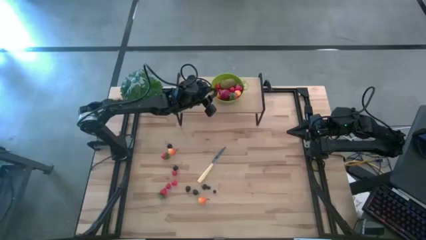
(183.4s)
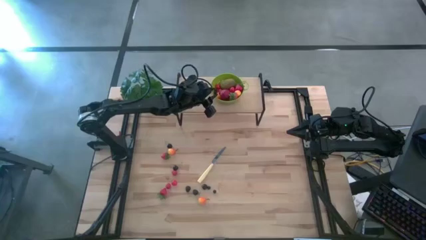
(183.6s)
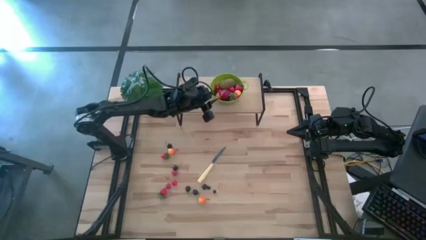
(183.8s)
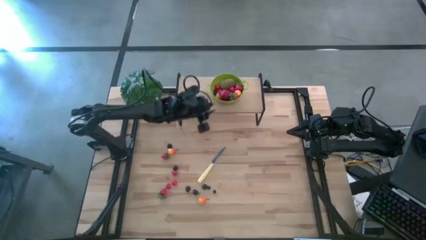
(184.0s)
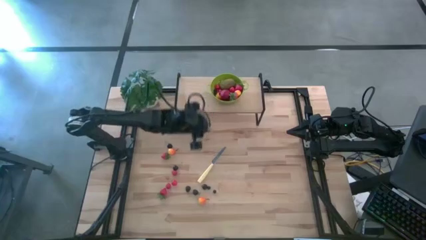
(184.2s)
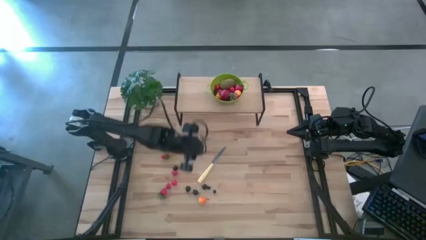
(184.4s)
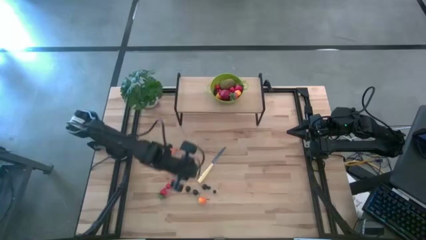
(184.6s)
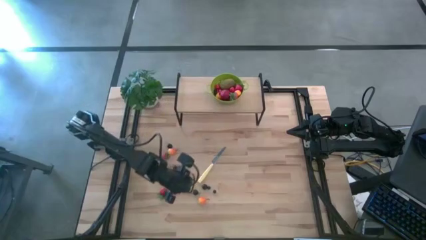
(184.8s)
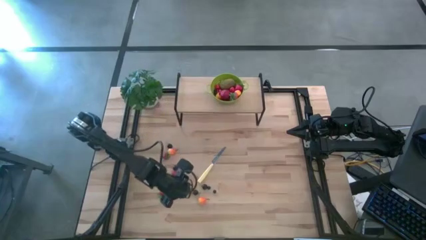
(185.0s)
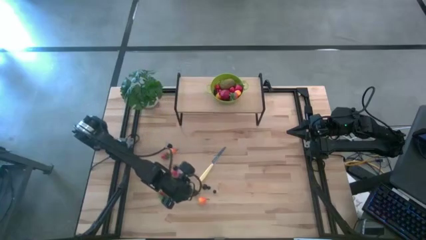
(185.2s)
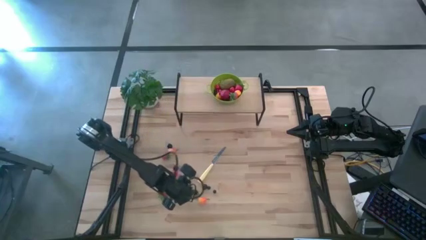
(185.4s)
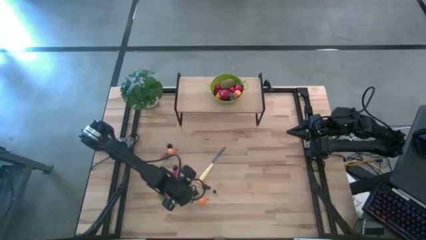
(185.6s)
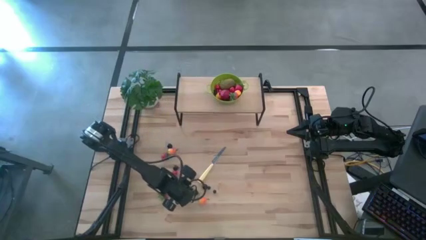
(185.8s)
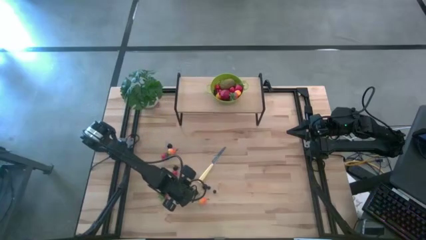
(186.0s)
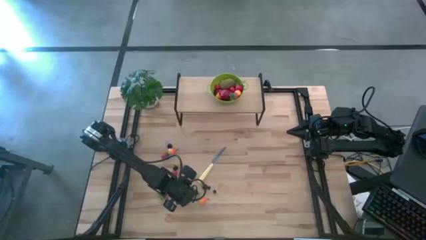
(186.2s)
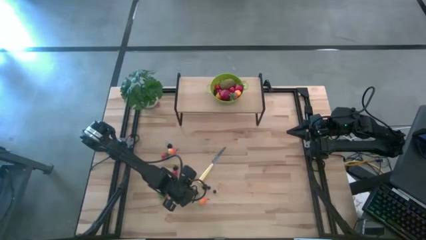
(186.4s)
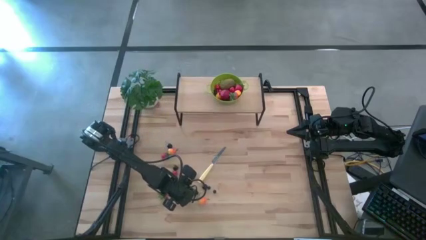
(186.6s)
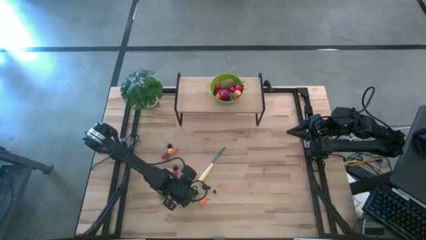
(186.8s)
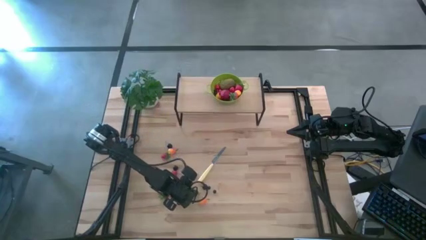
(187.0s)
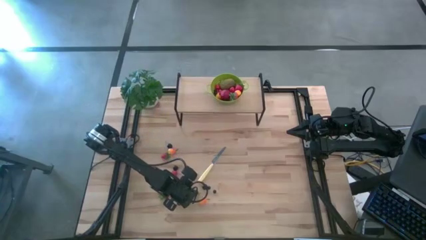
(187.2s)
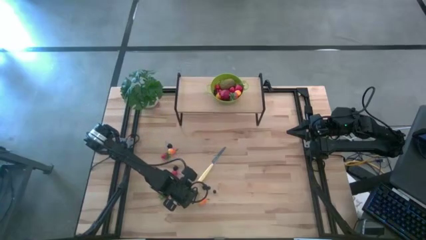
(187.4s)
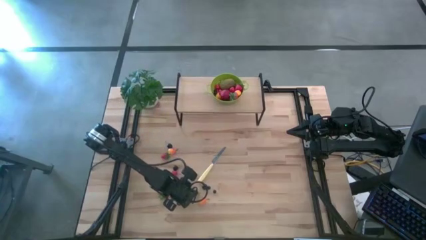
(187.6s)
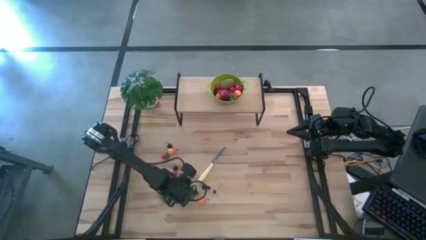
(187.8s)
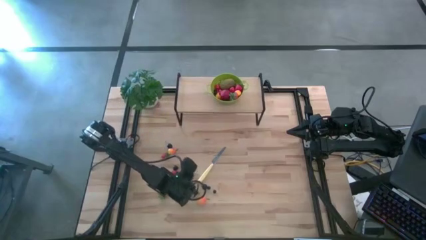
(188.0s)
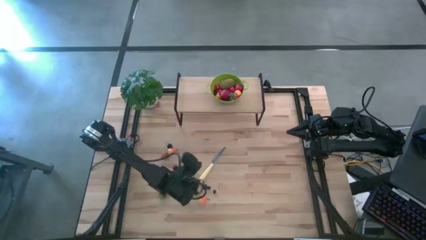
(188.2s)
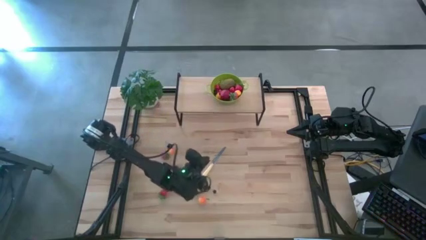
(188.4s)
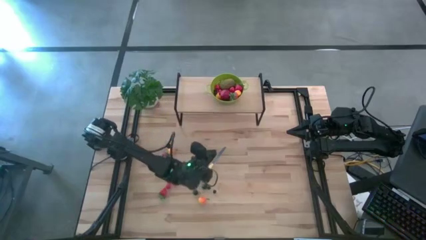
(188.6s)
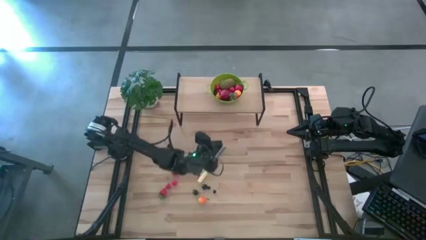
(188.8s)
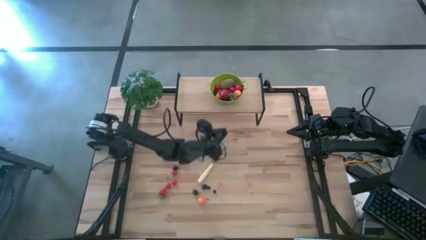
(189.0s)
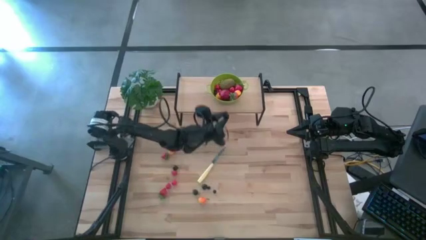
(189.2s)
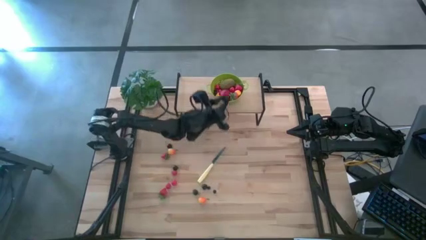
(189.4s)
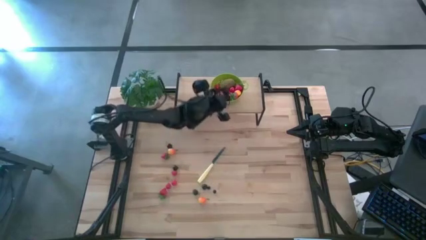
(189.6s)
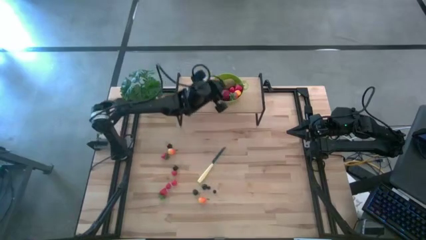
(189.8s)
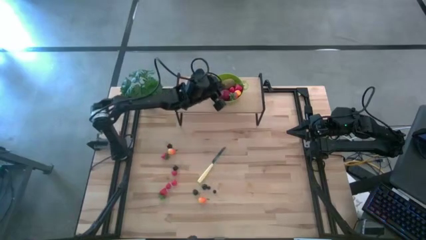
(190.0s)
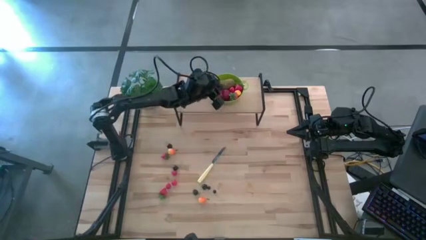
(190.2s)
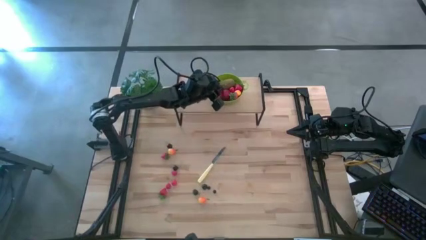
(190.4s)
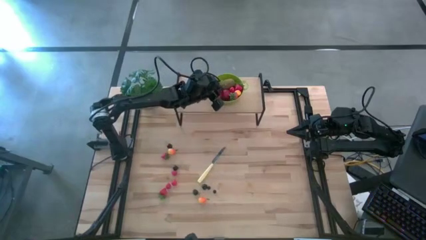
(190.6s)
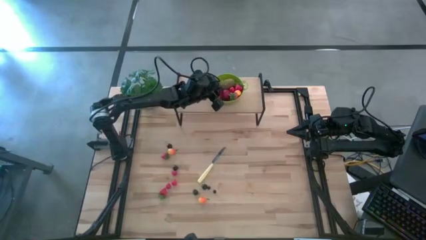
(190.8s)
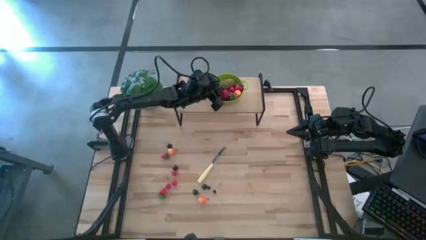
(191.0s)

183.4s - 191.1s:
Task: Pick & Place Fruit
Put the blackberry into the strainer bowl

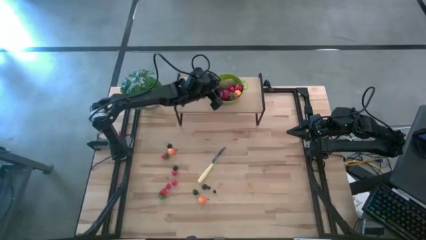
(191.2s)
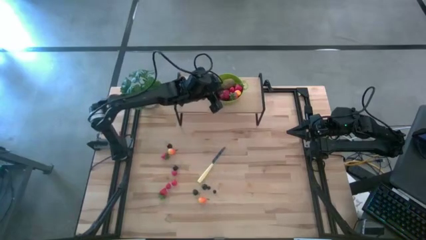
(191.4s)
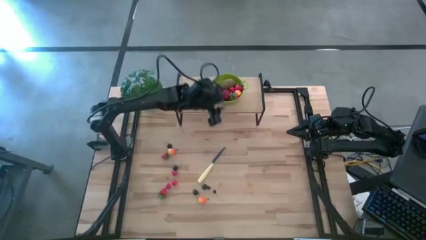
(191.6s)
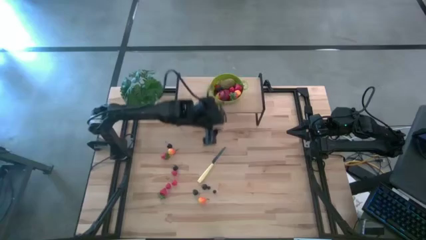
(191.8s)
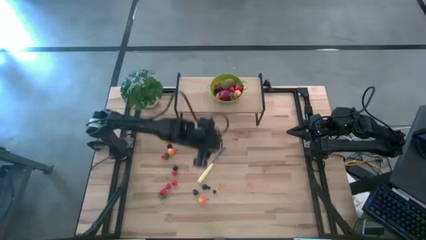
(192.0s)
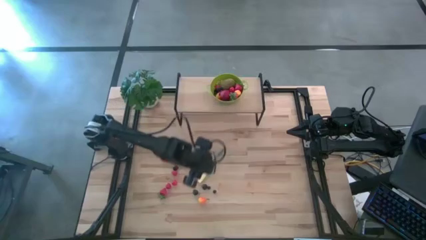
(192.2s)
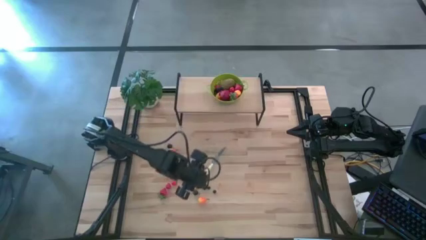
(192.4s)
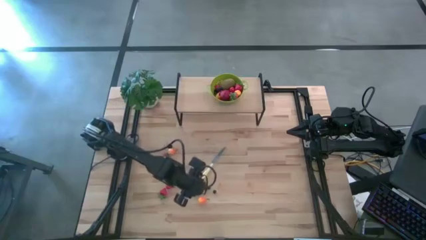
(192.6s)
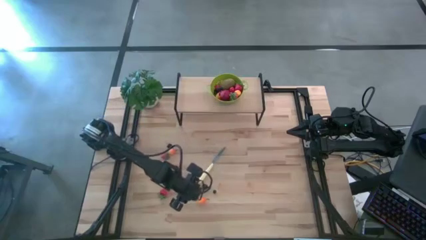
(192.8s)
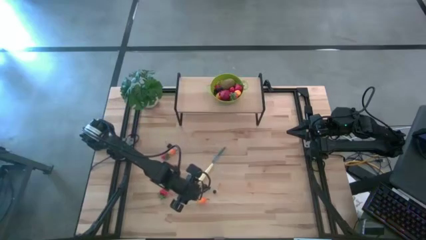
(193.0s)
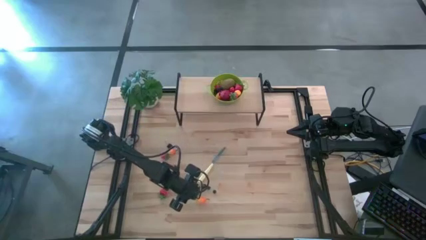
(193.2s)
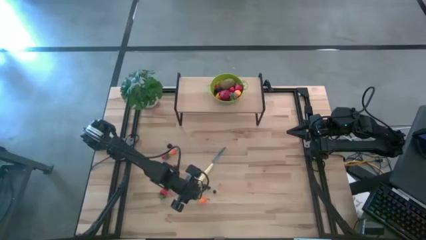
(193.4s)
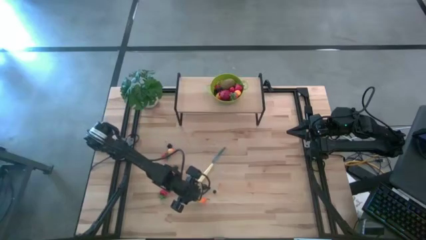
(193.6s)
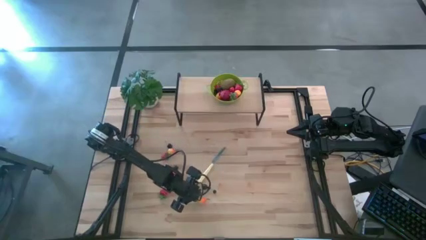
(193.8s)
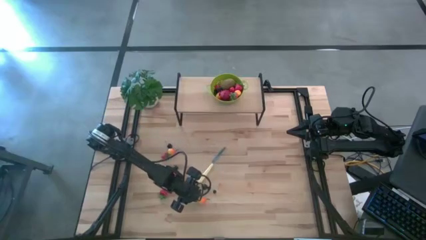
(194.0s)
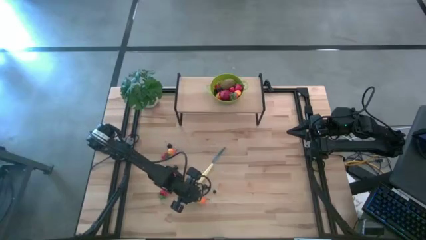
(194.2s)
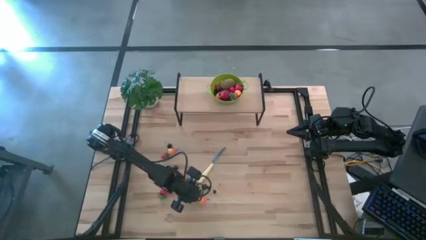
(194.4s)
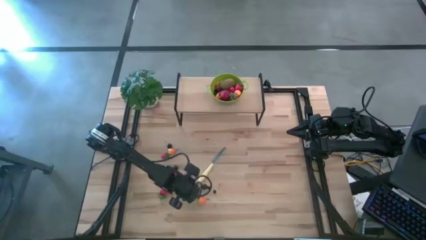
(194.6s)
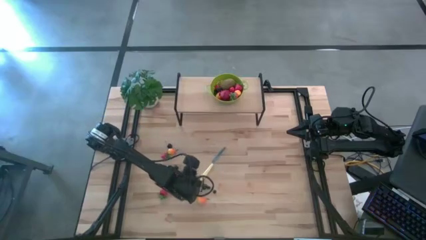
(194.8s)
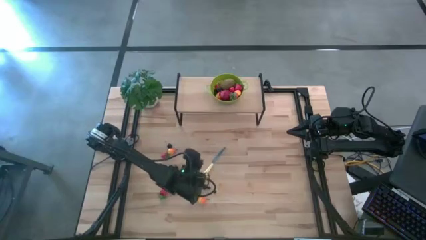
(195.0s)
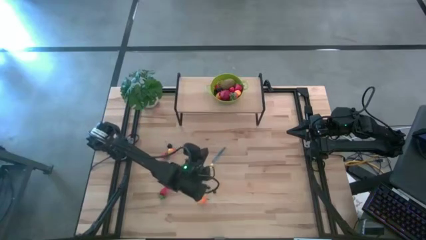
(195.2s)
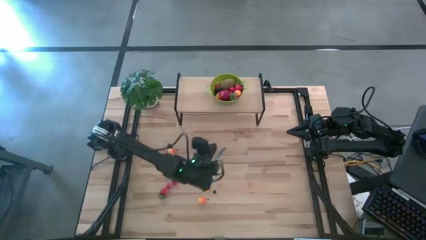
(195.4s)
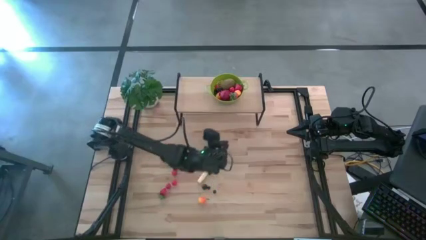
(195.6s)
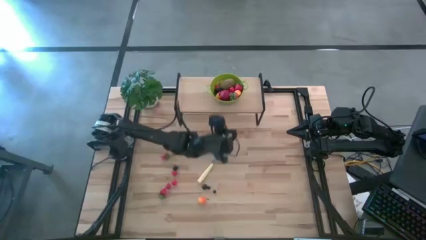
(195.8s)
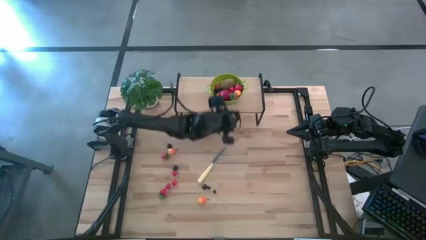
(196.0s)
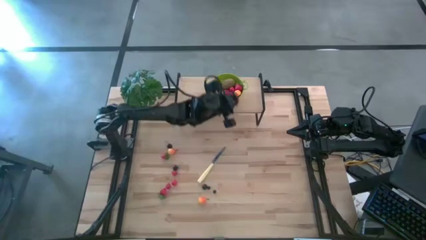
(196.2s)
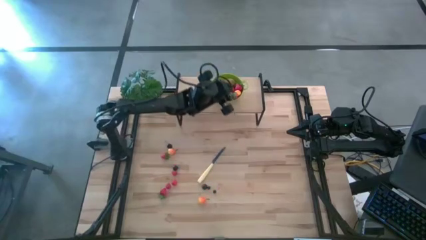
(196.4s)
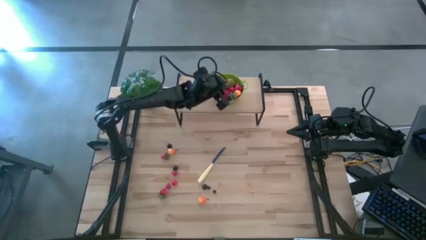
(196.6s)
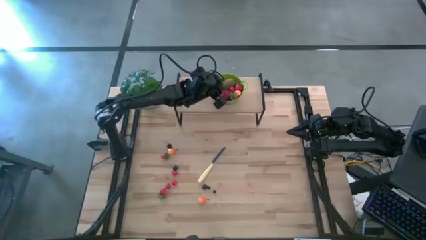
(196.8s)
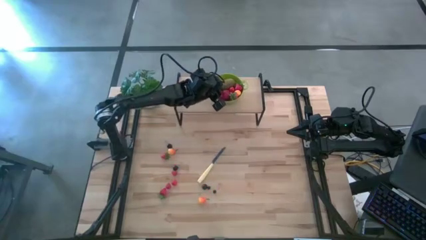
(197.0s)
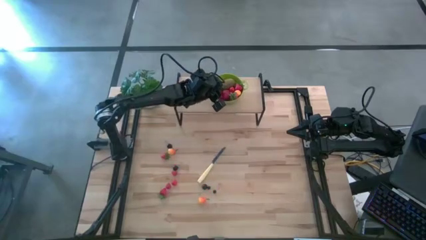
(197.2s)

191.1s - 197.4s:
Put the blackberry into the strainer bowl

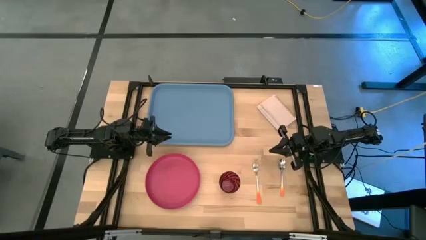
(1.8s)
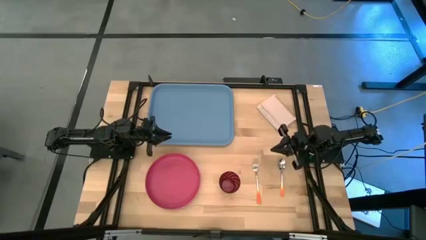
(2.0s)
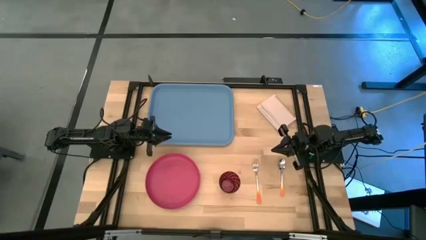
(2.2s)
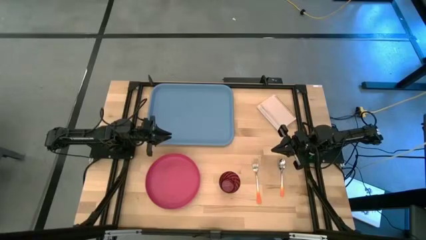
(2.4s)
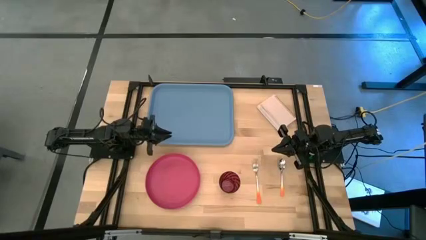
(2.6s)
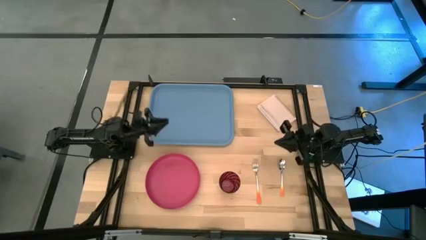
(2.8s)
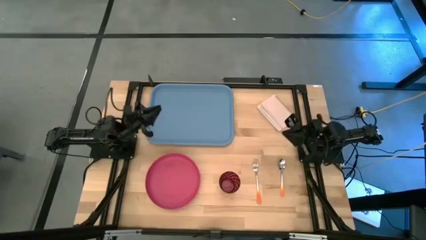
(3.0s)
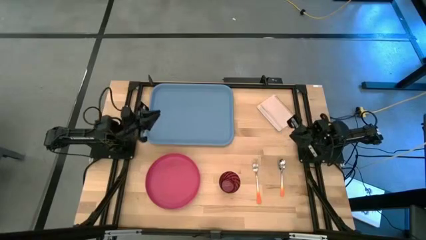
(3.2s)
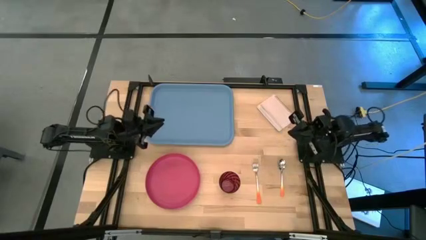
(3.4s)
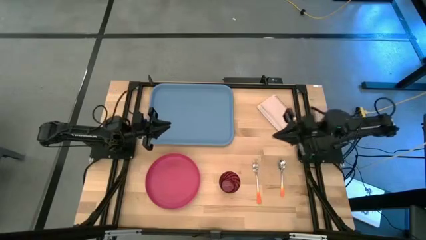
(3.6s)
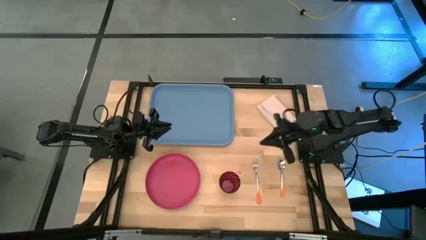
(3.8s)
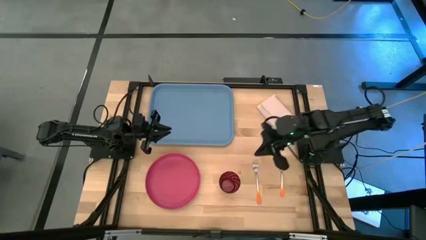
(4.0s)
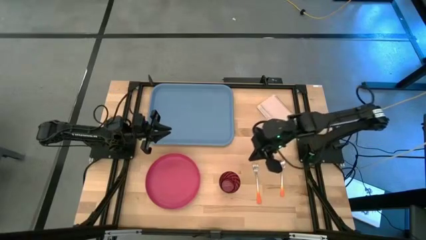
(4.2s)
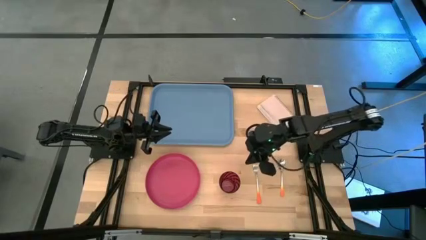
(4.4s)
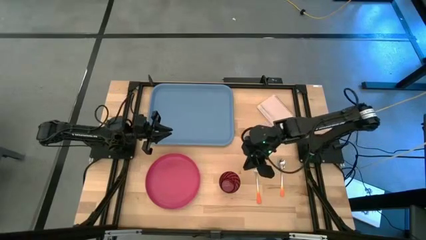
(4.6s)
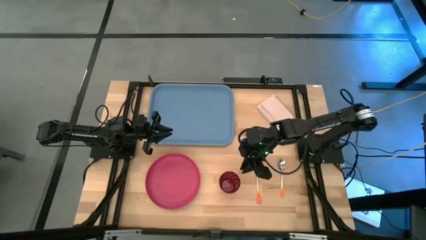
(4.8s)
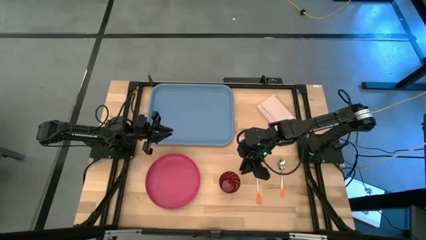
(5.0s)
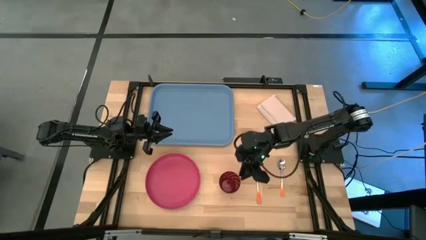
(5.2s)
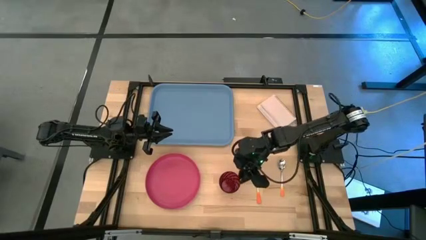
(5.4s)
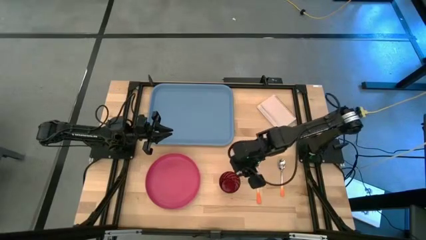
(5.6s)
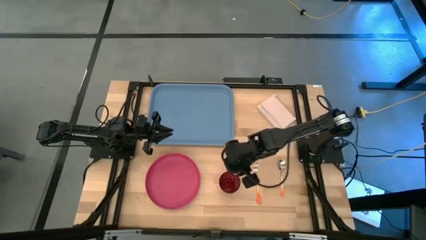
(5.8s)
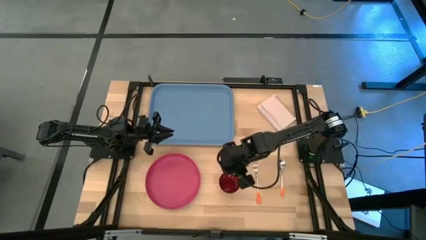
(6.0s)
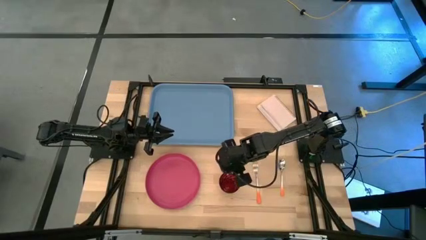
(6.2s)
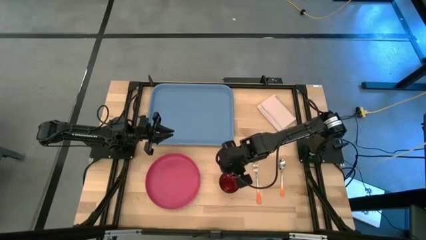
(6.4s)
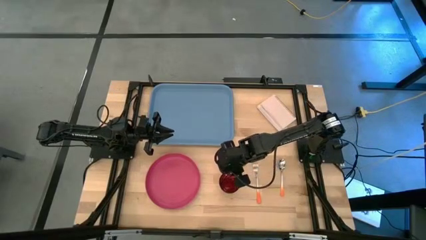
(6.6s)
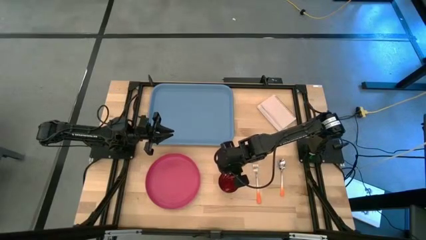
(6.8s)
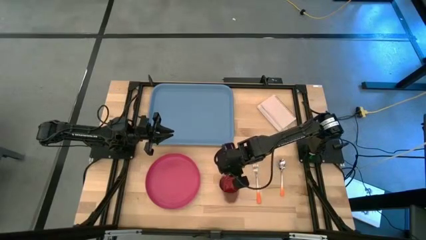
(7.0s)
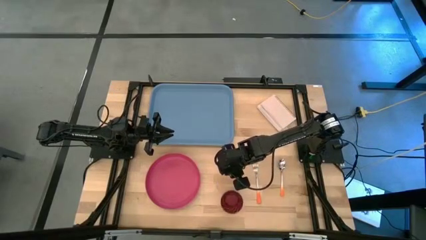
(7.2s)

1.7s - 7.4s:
Task: Pick and place plate/cup/fork/spoon on tray
Put the red glass on the blue tray
